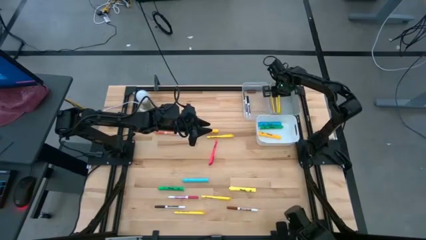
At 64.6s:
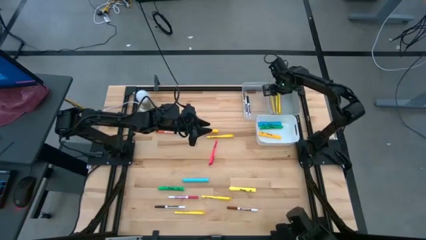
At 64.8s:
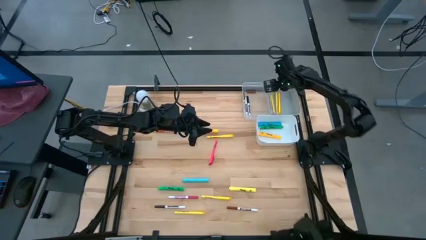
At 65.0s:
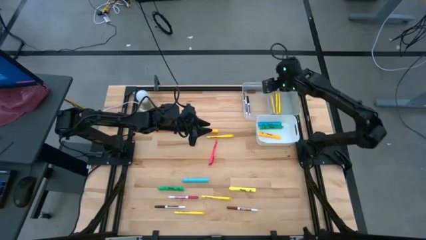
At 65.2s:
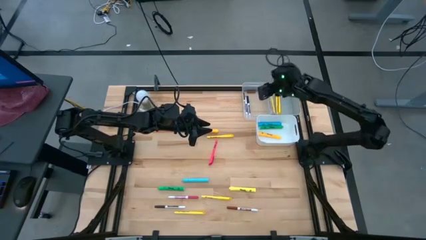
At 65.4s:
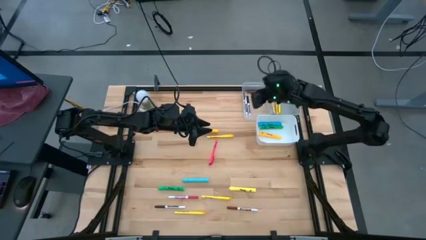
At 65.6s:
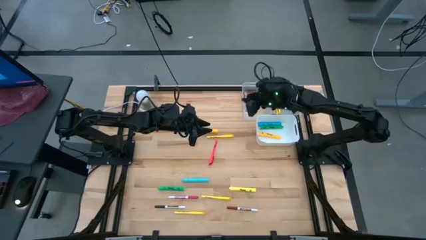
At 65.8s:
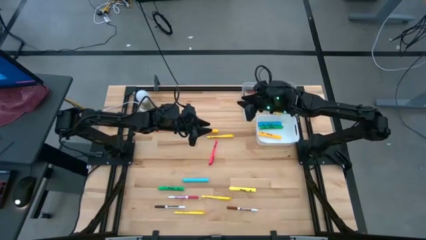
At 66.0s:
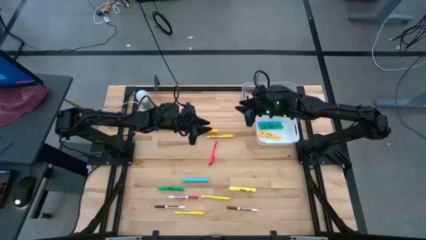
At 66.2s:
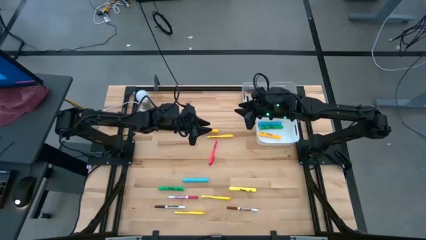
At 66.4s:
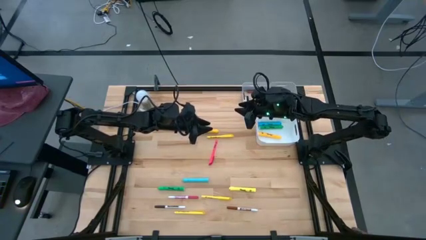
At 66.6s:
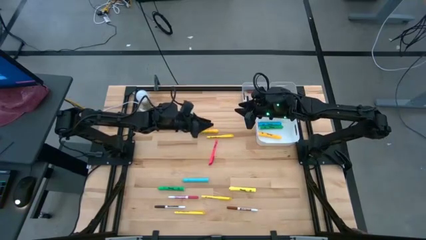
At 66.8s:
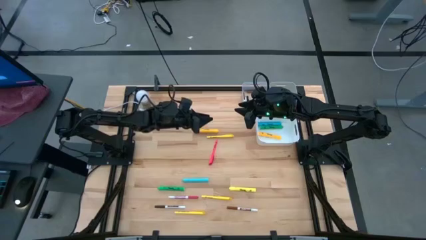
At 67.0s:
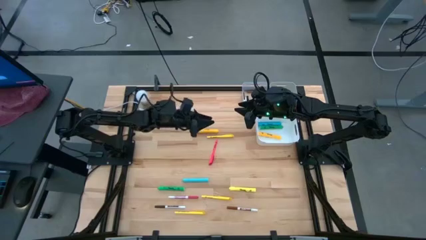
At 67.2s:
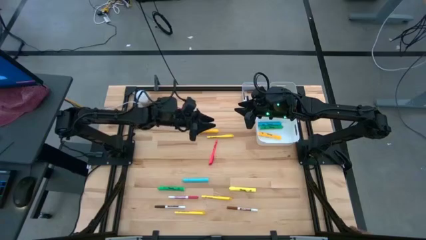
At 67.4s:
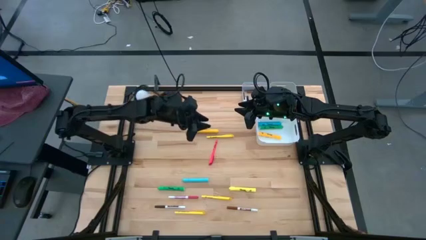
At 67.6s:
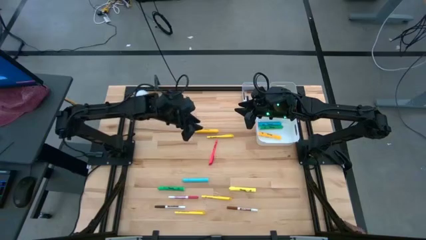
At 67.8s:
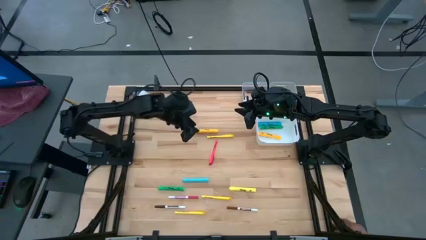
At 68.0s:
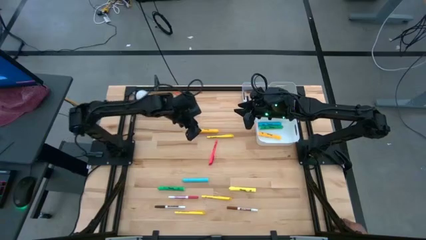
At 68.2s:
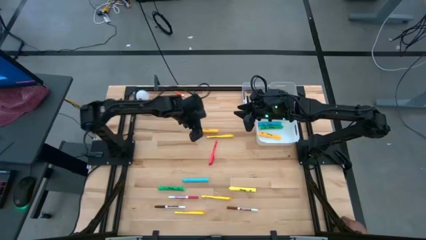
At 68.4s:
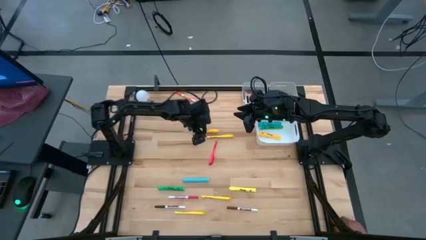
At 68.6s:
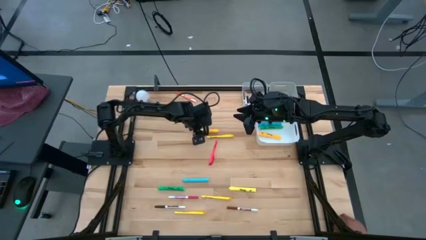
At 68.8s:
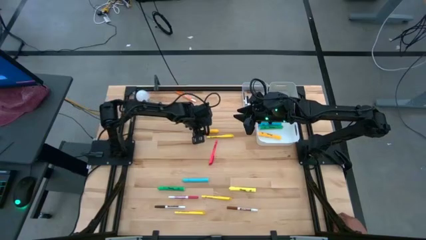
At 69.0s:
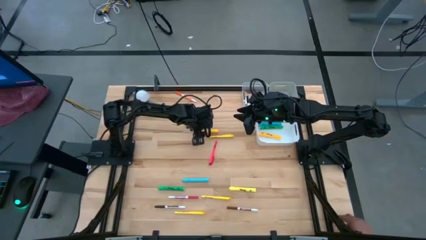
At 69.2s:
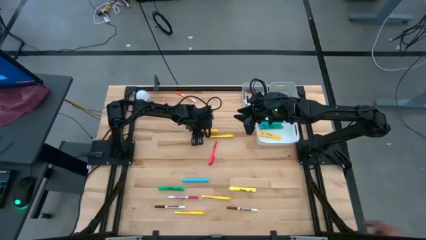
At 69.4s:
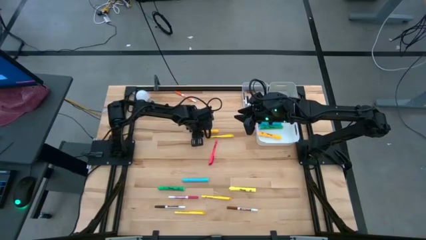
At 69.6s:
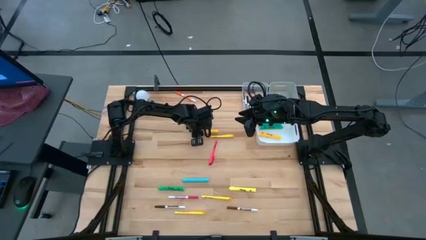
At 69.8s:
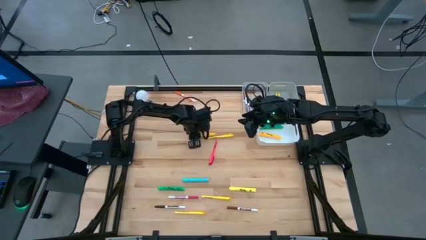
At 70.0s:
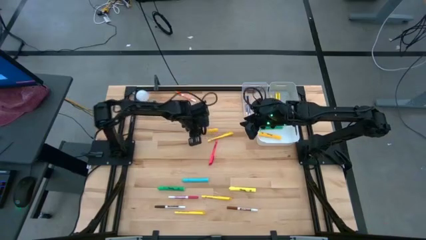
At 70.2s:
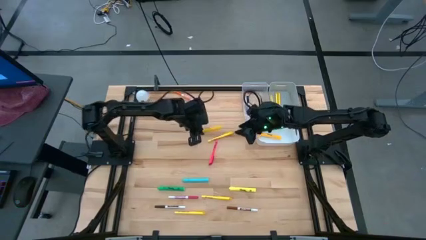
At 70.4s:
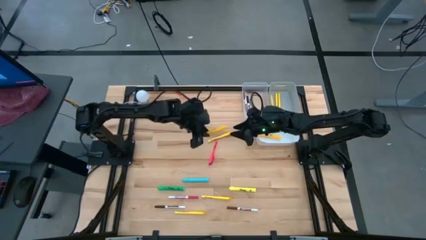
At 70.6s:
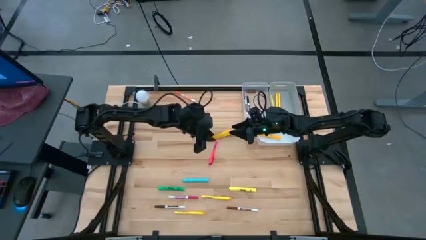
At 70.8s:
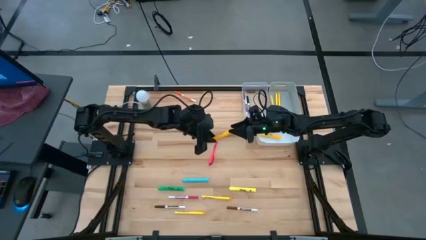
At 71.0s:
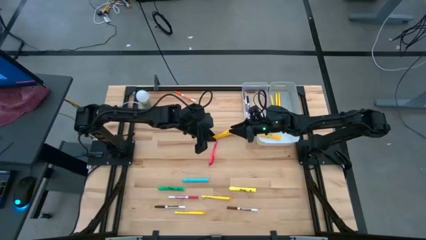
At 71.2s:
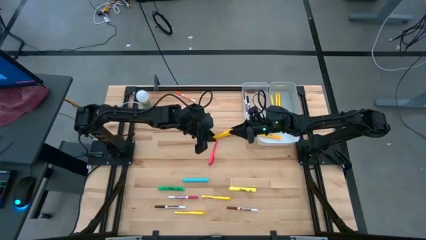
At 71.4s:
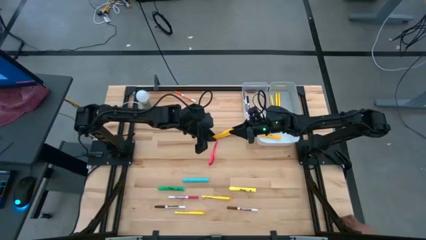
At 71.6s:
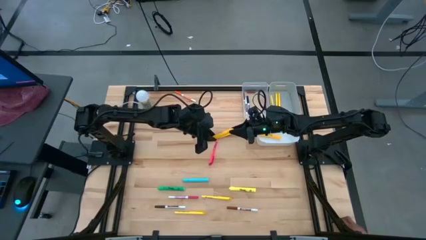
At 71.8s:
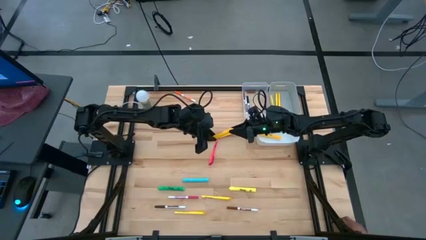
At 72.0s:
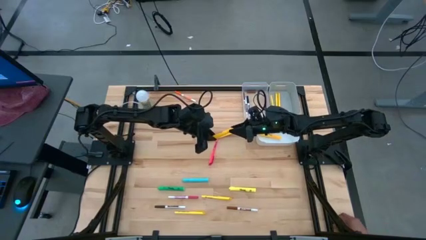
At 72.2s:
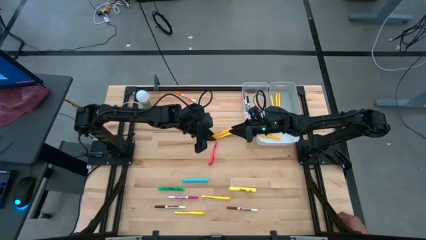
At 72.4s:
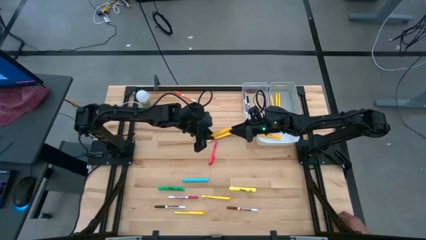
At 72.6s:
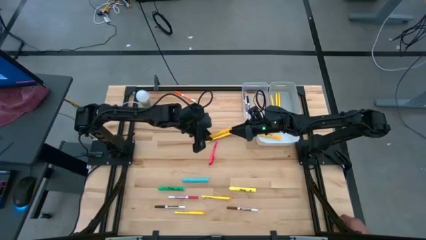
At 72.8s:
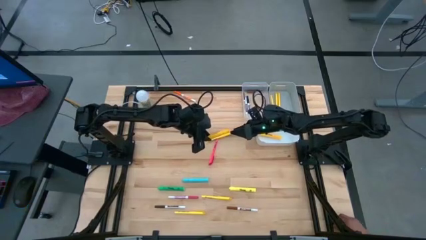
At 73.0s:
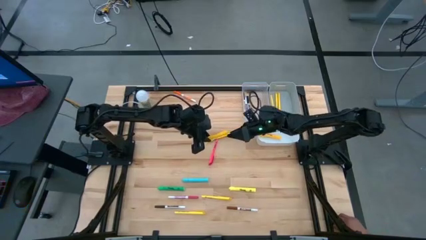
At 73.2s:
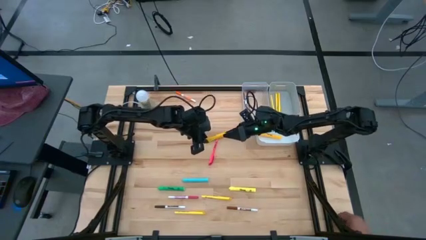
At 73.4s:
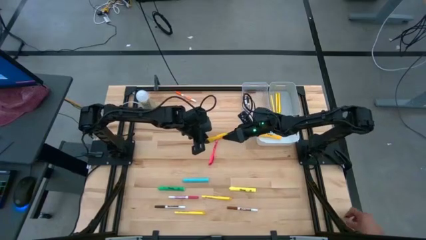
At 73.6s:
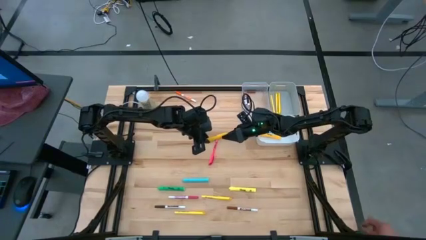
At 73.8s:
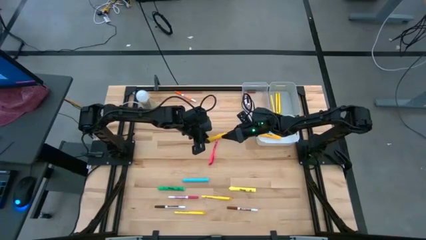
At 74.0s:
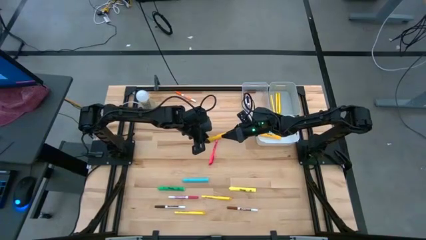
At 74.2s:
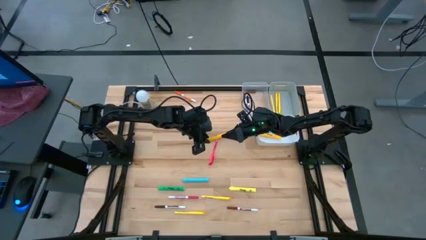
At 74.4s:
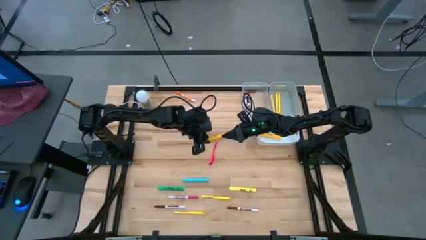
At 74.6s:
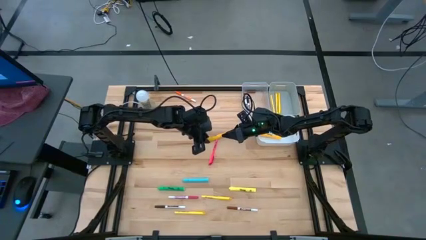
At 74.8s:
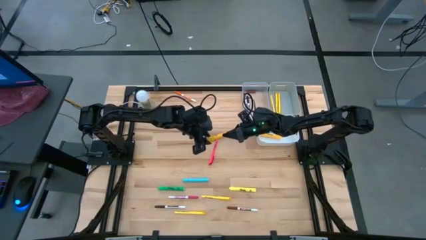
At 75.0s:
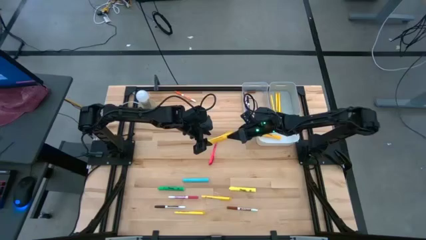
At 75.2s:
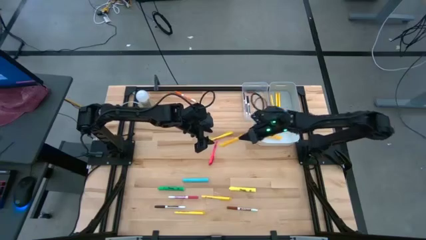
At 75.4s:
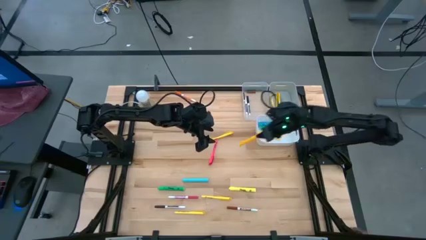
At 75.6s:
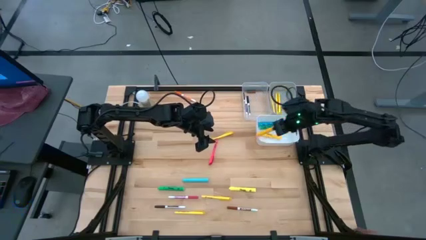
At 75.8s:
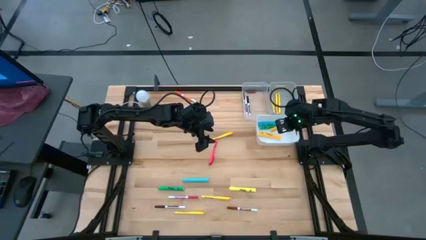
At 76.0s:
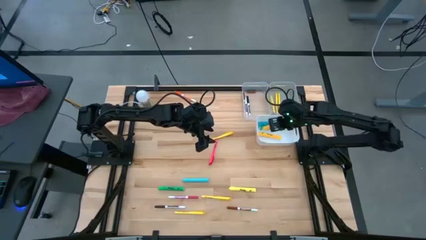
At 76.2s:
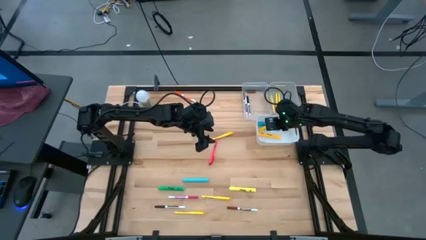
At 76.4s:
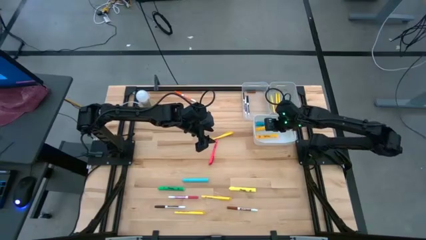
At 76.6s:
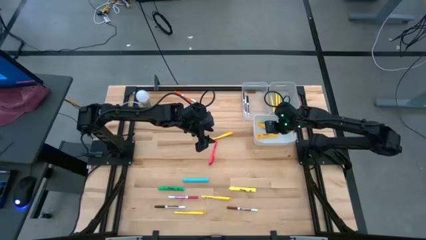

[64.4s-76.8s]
Task: Pick & Place Markers
Put the dark yellow highlighter pen into the white bin

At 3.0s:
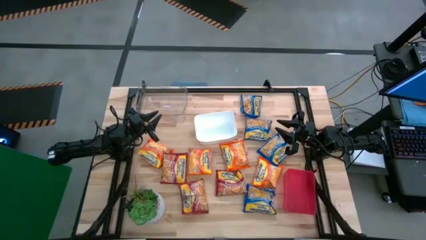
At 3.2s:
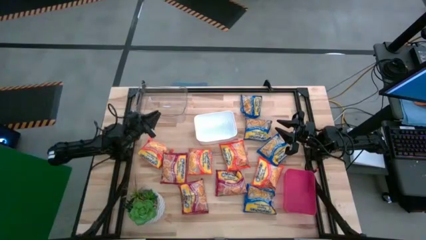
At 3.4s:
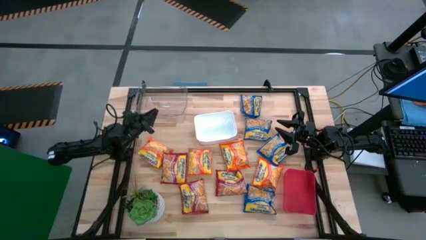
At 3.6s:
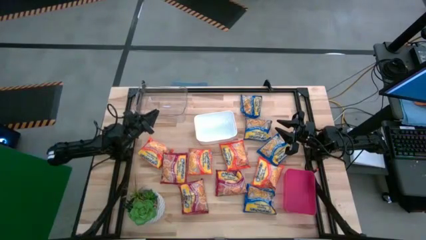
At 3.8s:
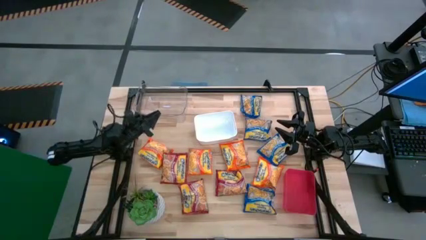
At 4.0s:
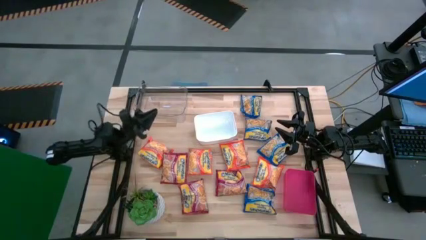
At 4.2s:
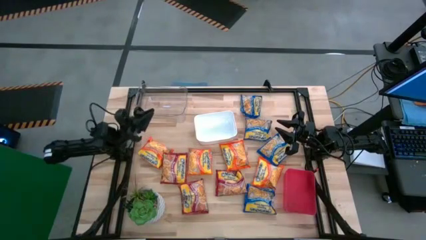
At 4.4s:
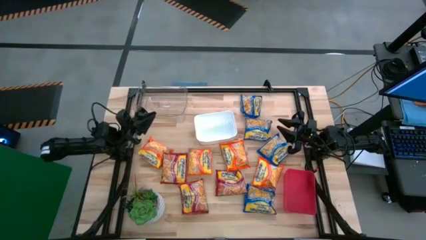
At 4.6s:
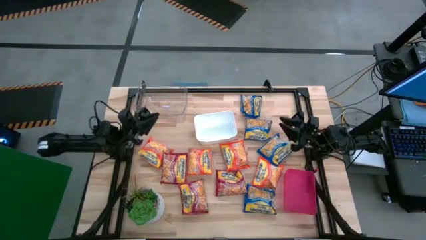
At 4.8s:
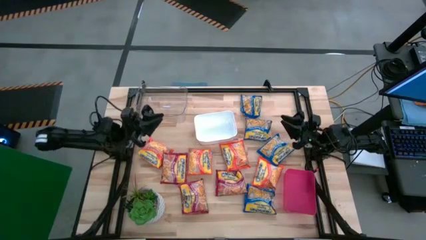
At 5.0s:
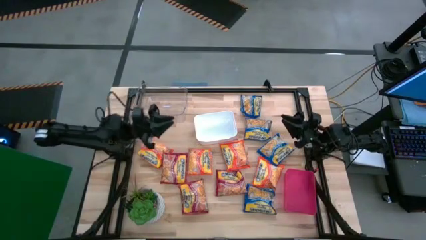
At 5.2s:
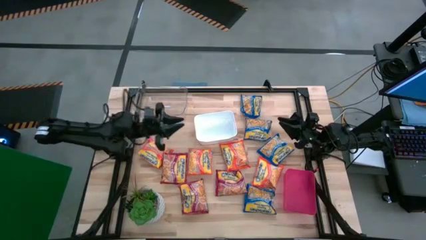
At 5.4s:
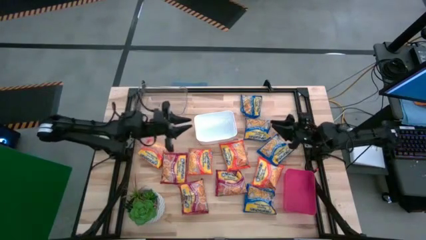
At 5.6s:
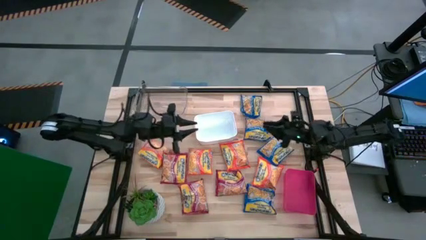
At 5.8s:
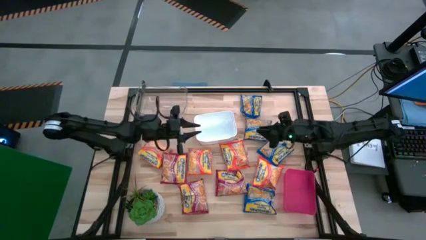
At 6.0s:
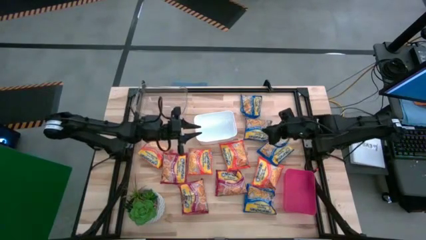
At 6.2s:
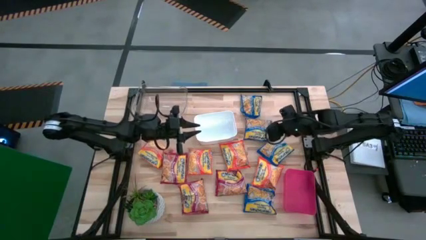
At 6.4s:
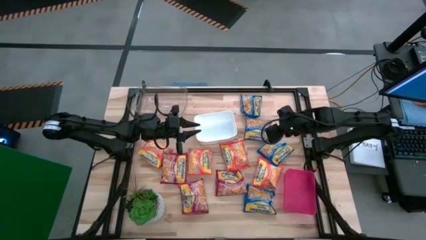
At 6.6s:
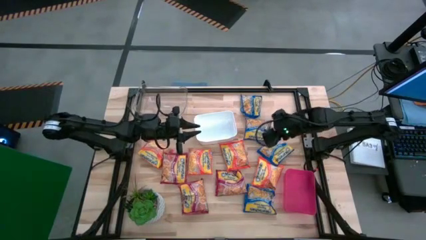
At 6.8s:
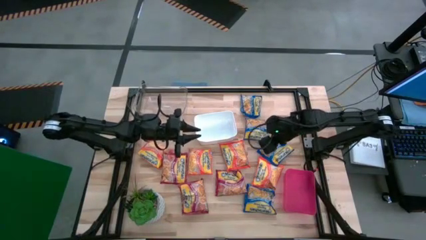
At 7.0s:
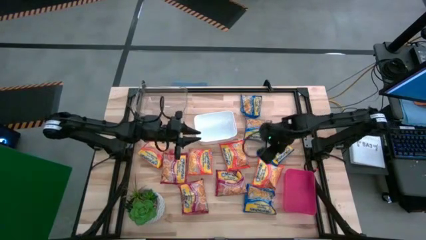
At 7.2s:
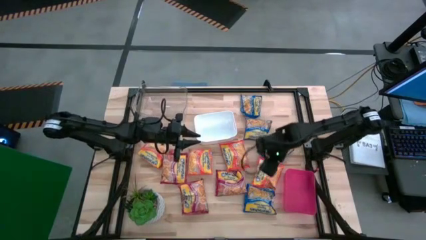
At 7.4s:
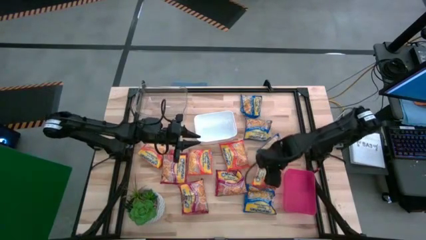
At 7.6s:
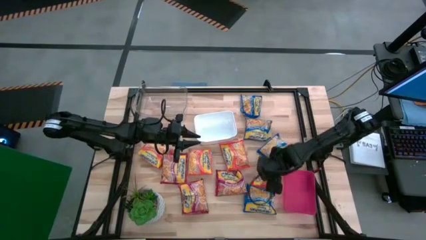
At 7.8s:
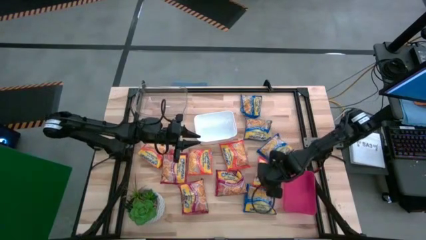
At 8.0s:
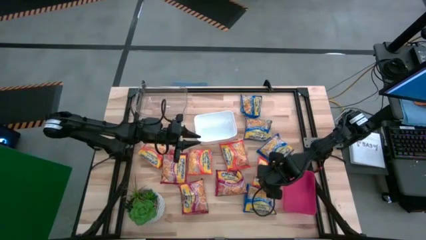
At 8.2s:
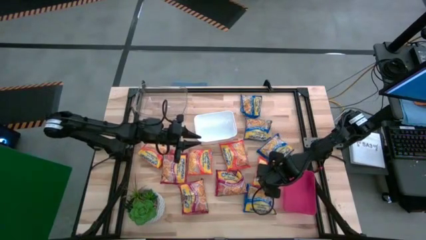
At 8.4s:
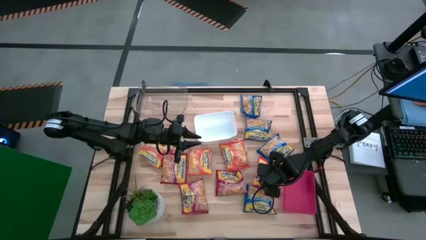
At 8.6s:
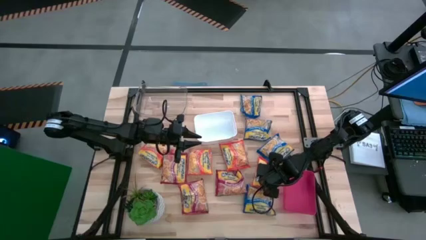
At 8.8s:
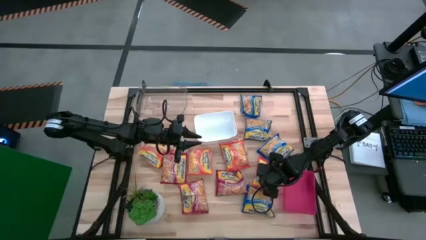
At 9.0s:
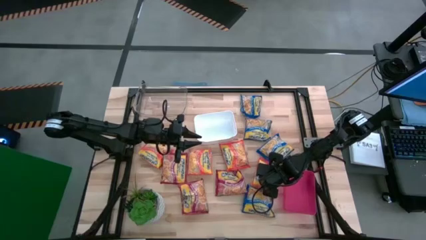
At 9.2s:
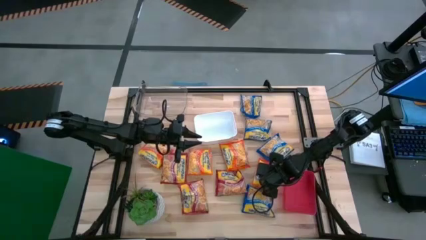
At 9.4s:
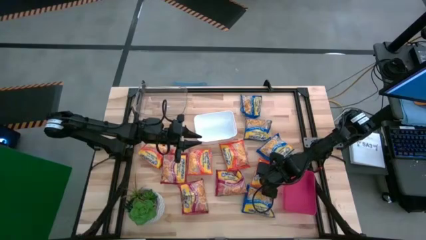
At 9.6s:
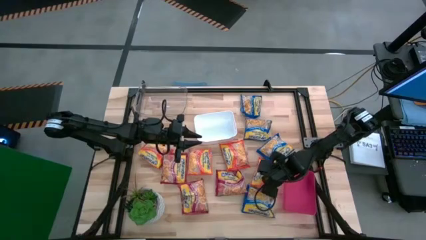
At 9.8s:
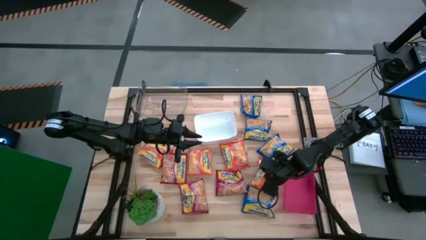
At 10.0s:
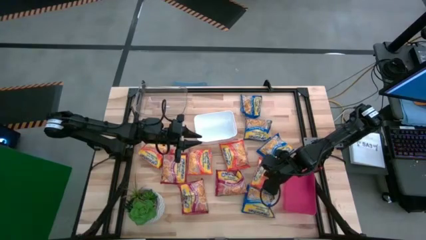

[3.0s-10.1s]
Task: Sort Maruchan noodles
Put the right orange noodle pack into the transparent bin
